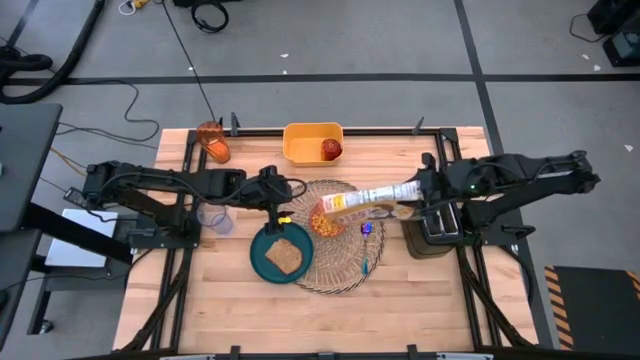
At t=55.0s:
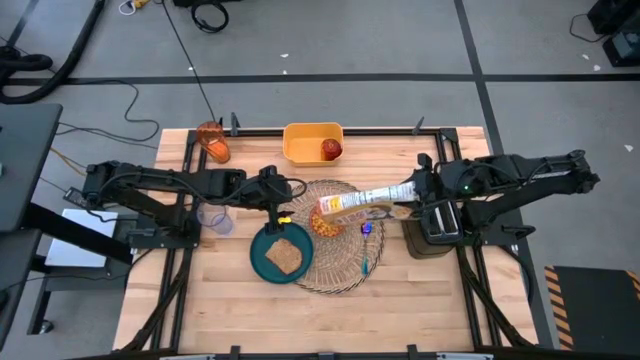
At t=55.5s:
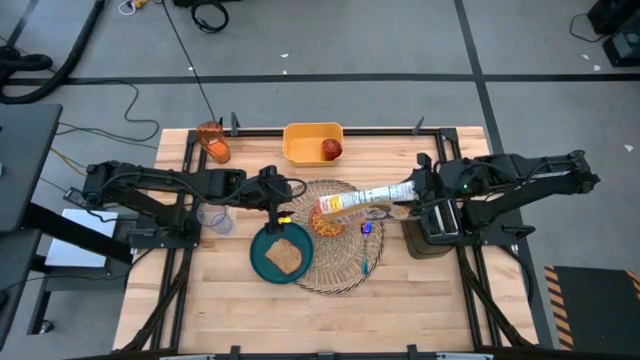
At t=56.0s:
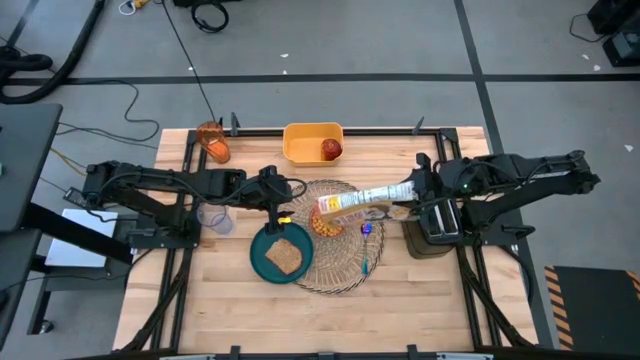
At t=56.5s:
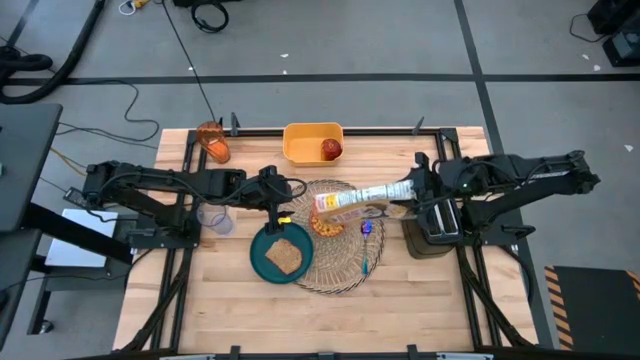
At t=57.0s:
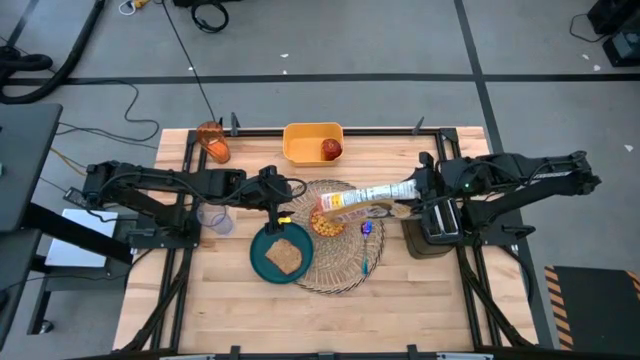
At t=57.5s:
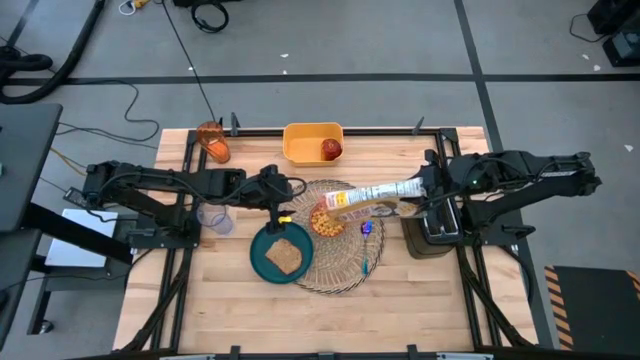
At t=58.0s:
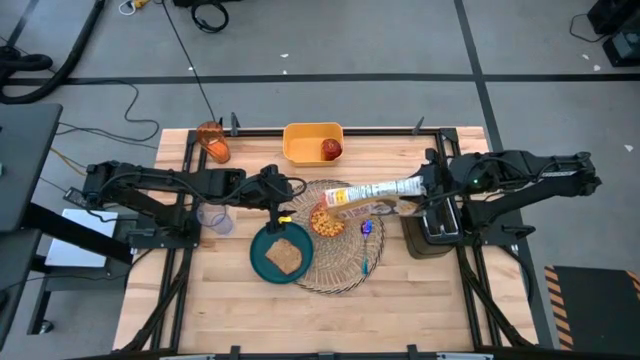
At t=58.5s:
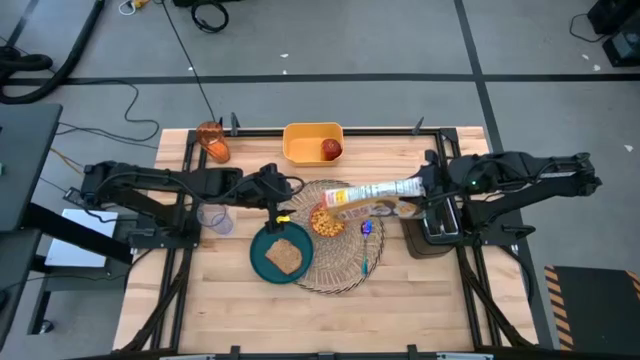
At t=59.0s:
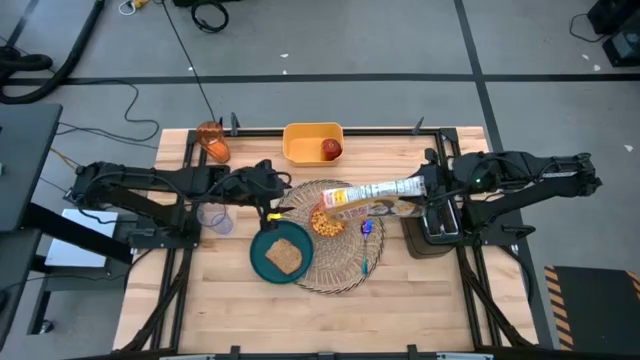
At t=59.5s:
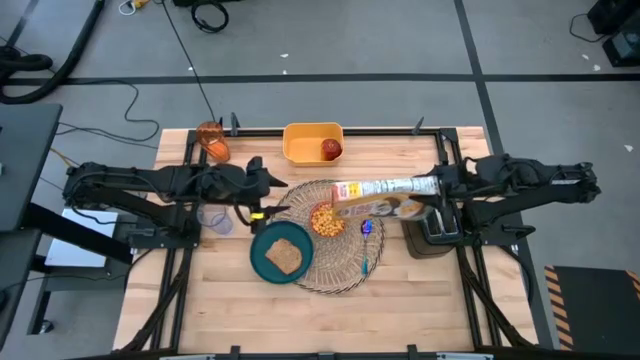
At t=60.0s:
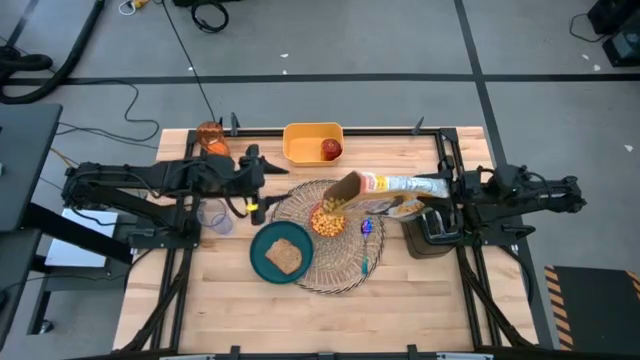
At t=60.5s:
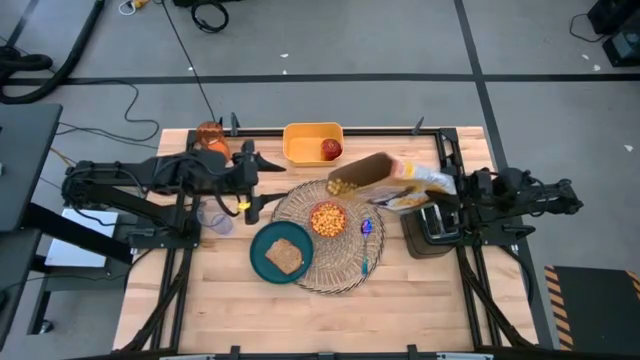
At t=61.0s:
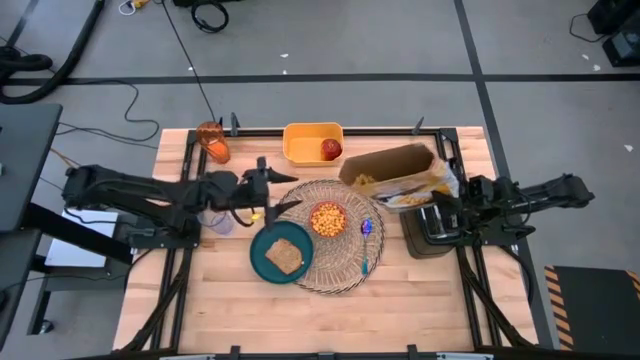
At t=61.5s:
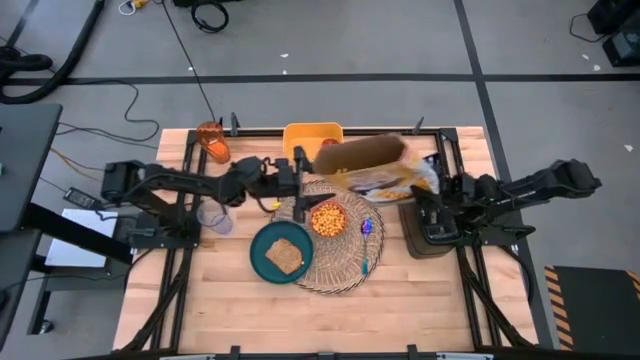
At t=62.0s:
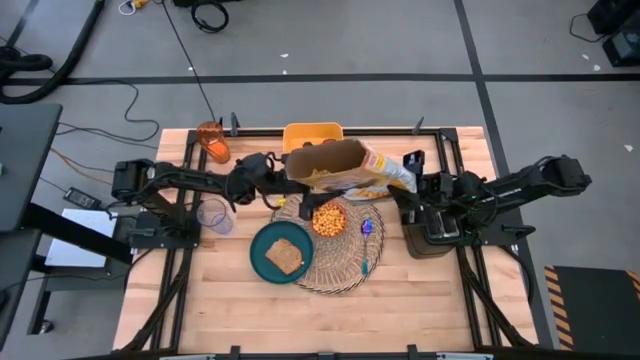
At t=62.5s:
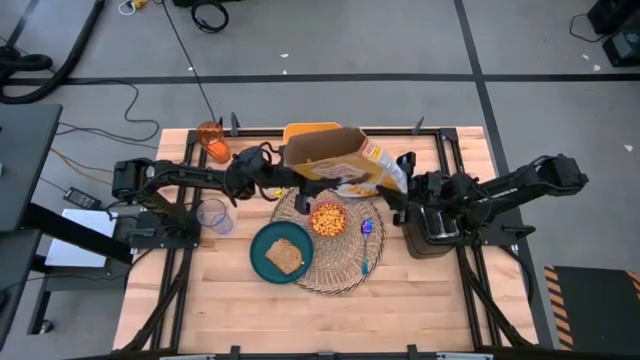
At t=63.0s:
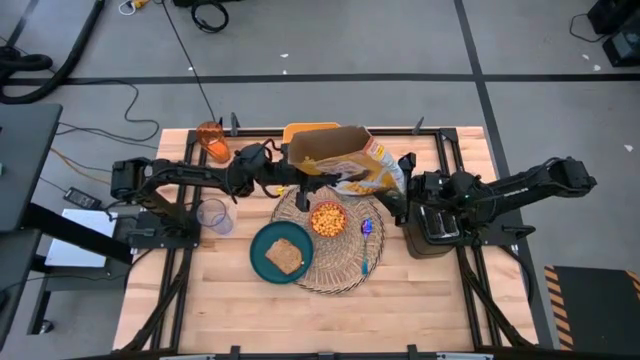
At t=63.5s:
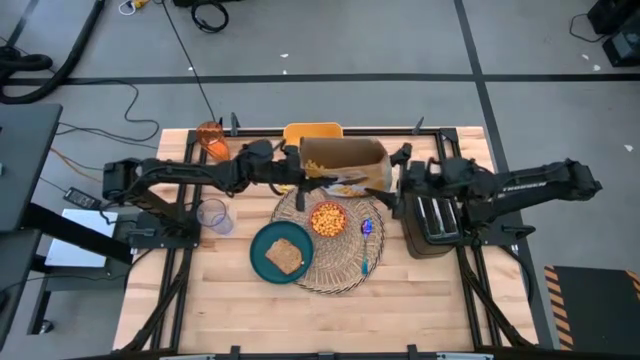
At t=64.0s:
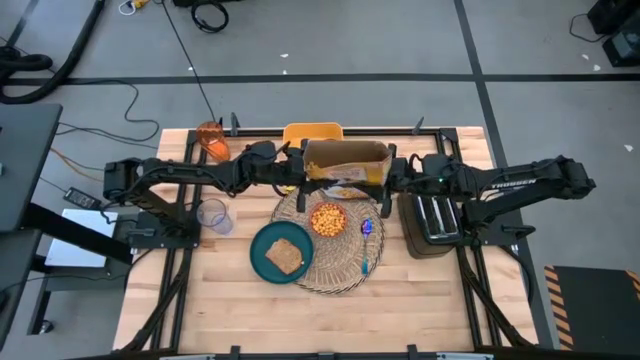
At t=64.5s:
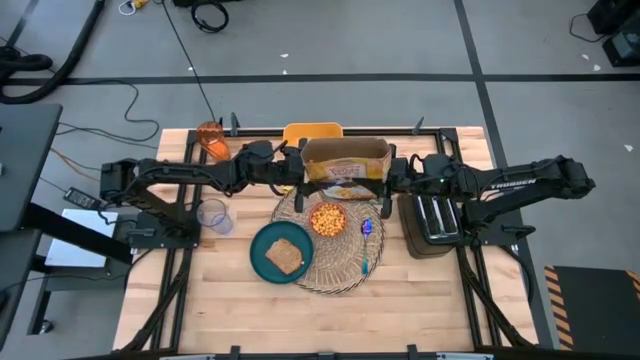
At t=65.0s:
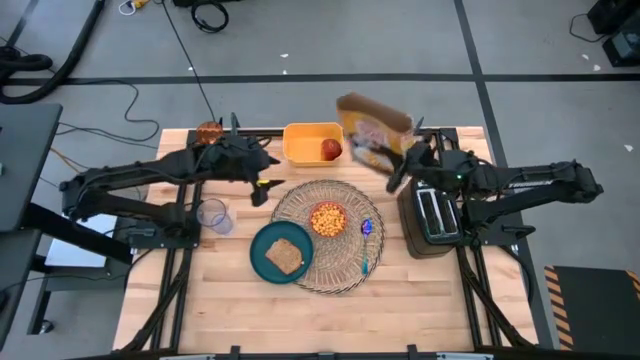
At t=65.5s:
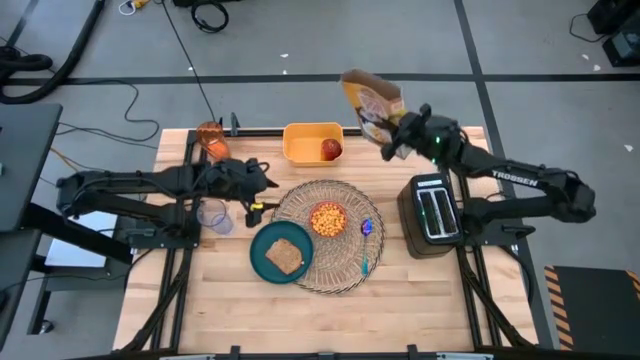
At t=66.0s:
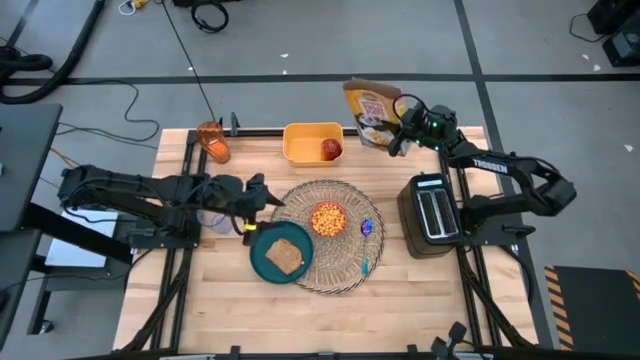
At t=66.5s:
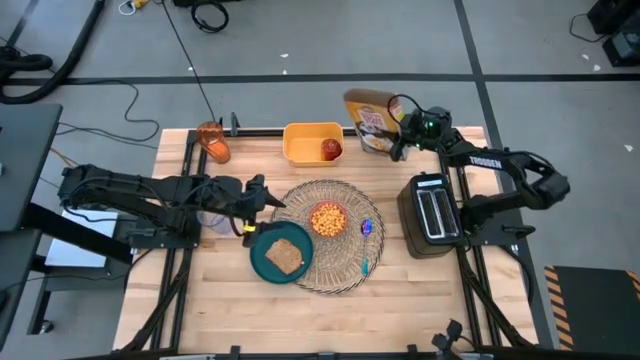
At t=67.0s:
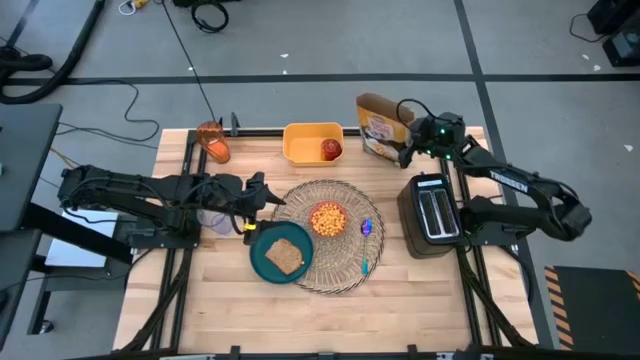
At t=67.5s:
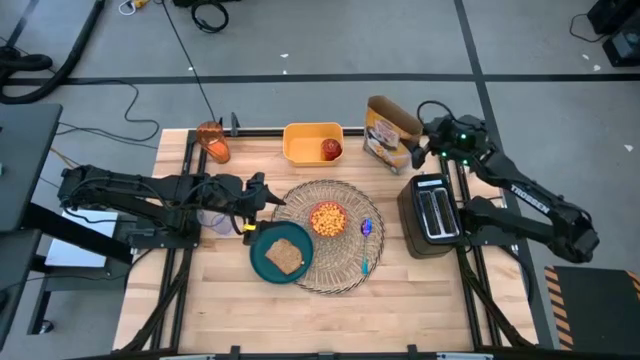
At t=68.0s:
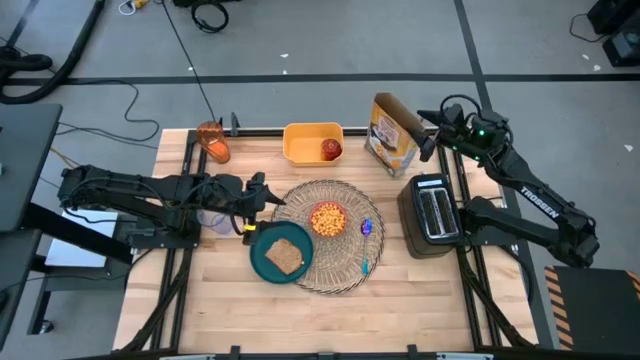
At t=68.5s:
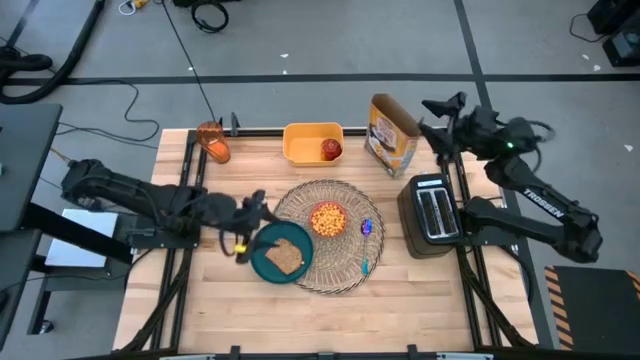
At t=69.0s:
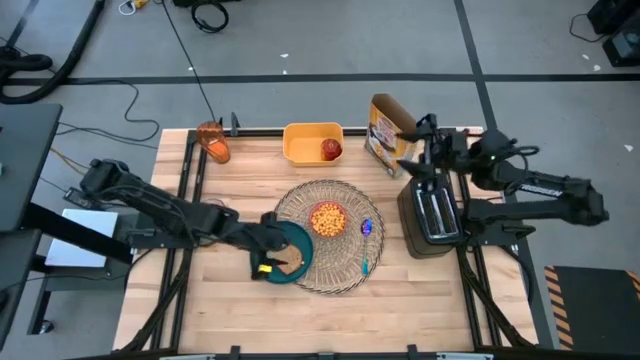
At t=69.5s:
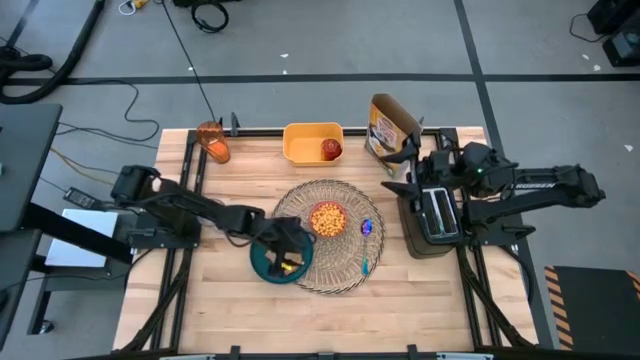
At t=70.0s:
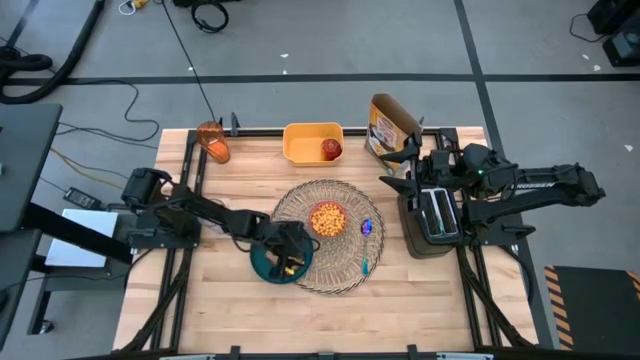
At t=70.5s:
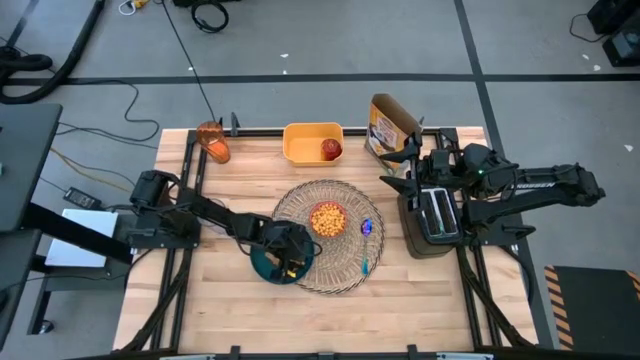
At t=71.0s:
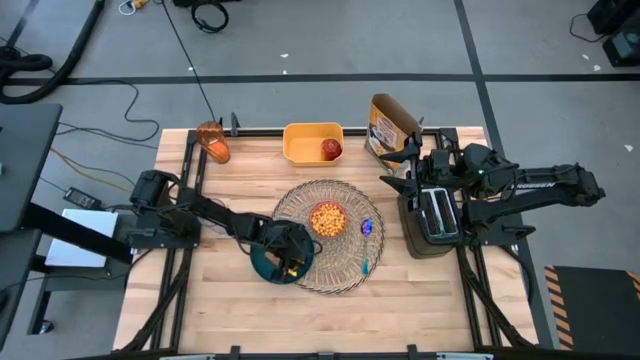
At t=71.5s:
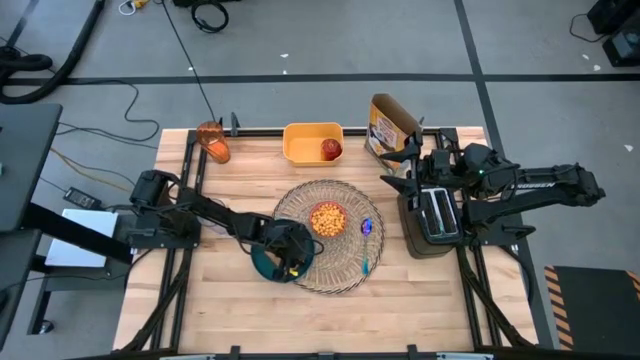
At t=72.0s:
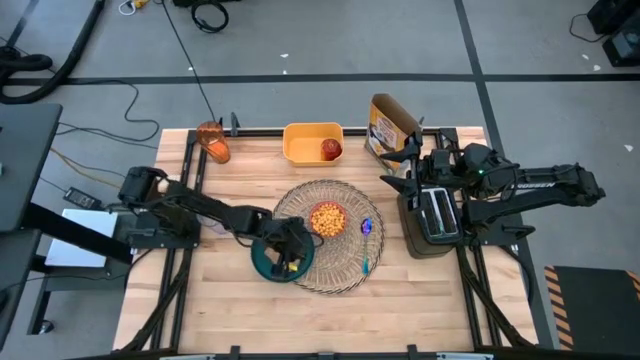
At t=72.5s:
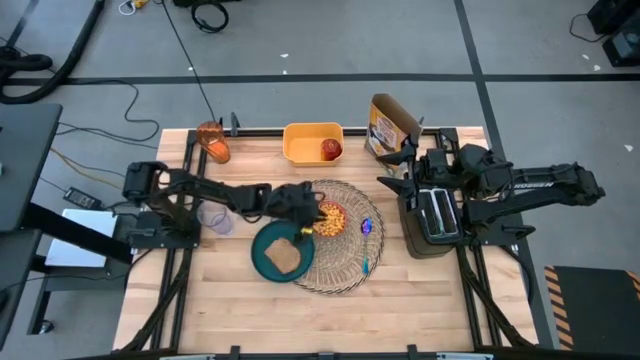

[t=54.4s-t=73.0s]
Task: Arrange a breakfast setting
Pour the cereal from the yellow cereal box into the red bowl
